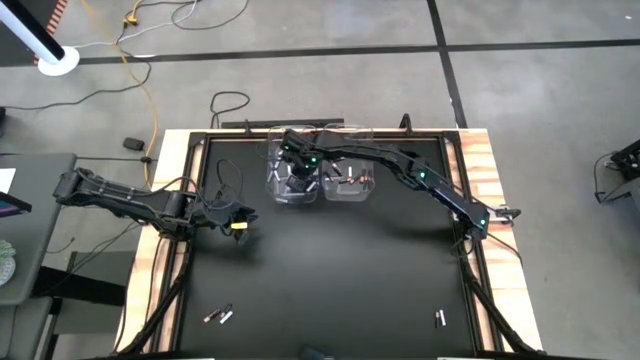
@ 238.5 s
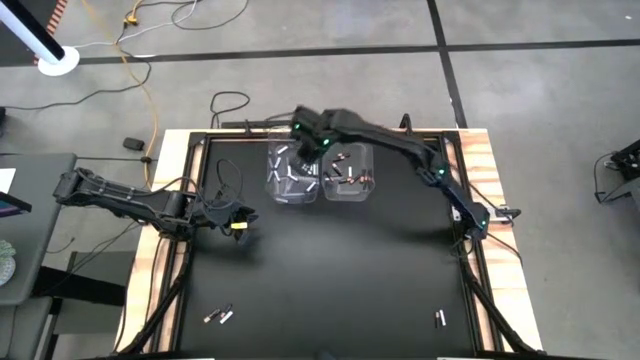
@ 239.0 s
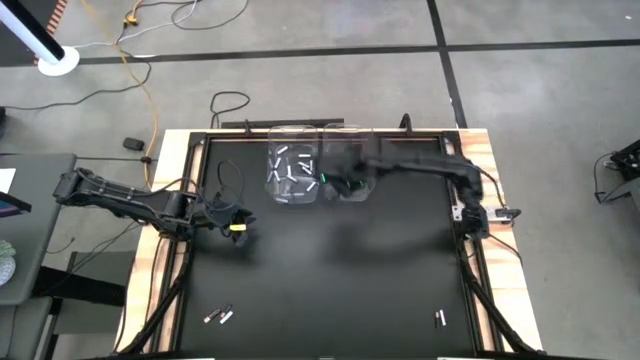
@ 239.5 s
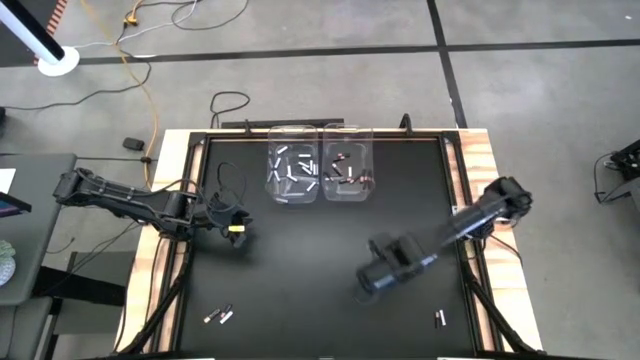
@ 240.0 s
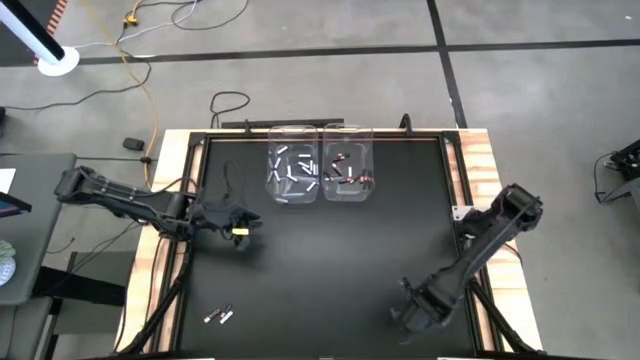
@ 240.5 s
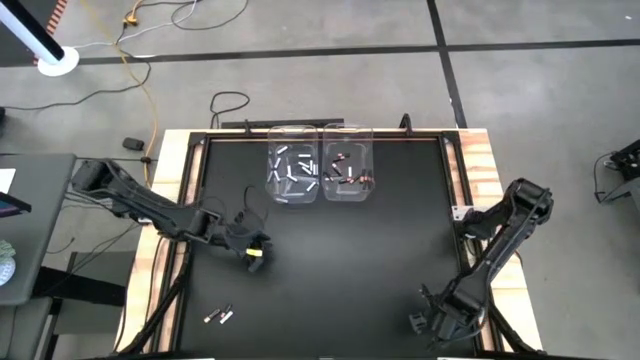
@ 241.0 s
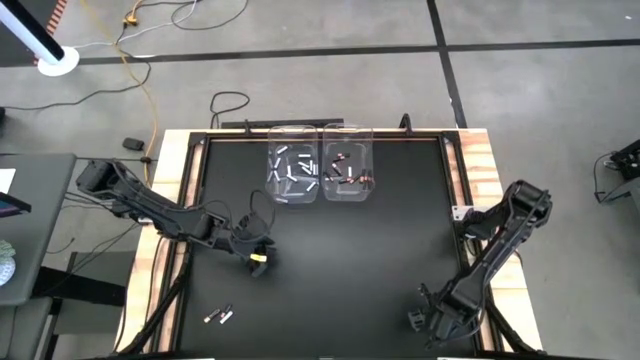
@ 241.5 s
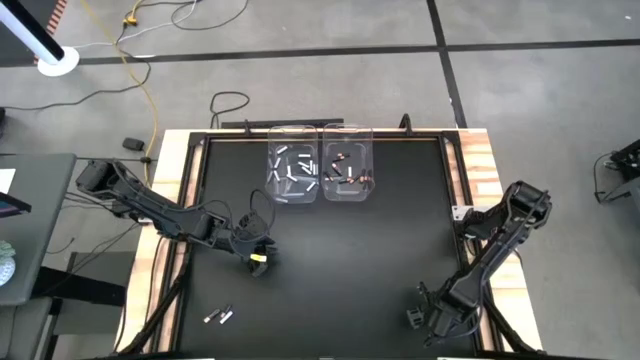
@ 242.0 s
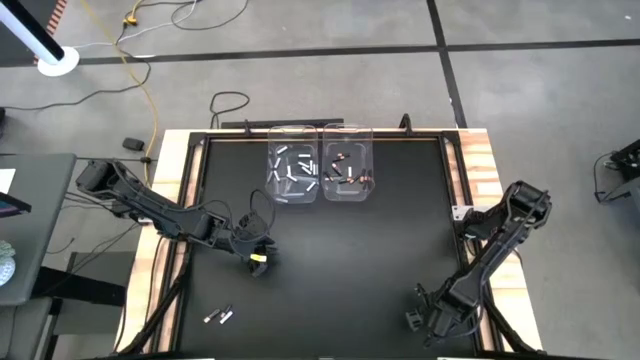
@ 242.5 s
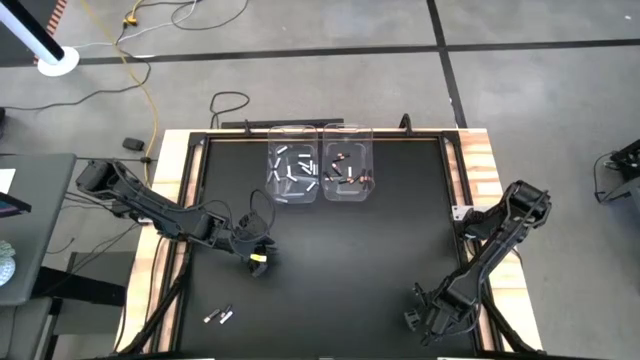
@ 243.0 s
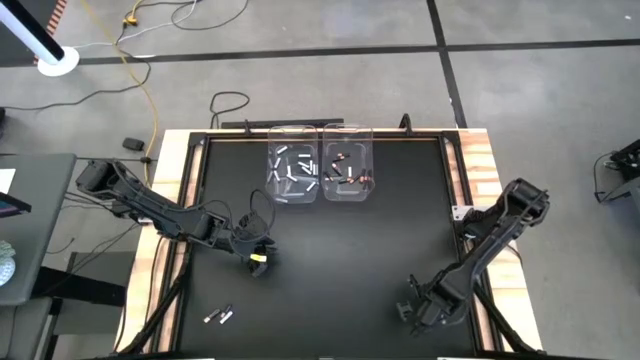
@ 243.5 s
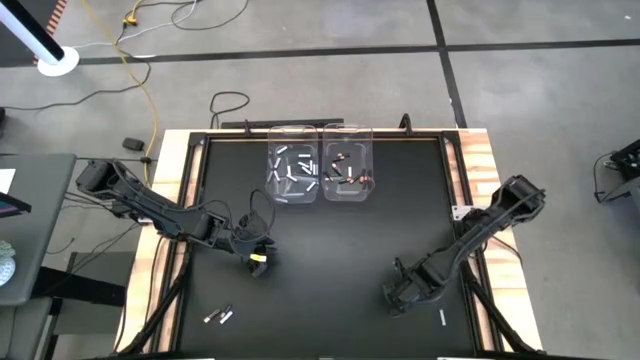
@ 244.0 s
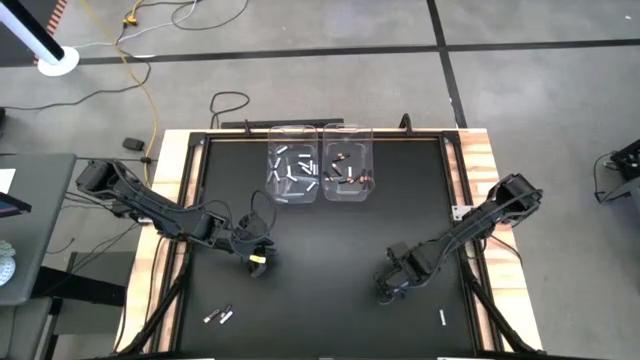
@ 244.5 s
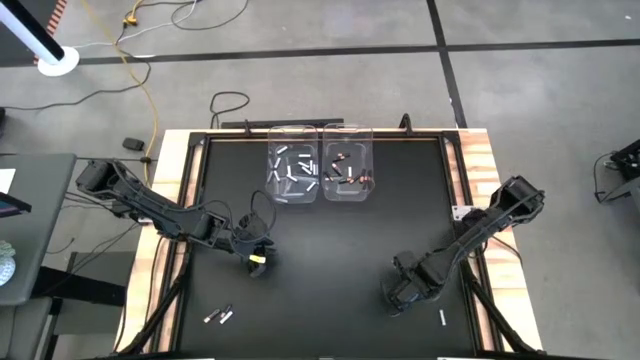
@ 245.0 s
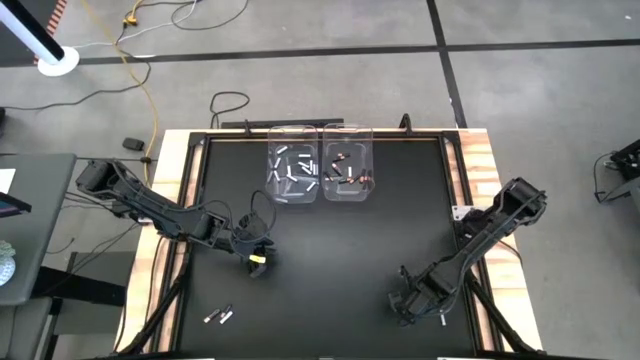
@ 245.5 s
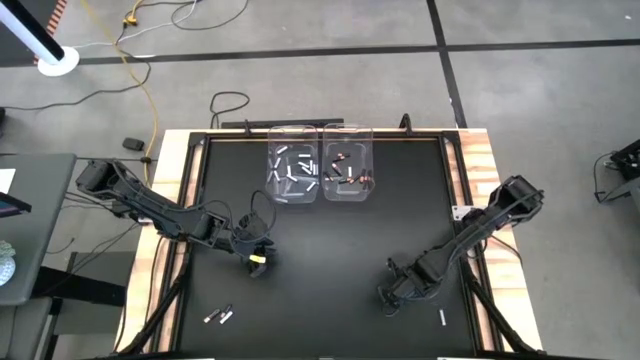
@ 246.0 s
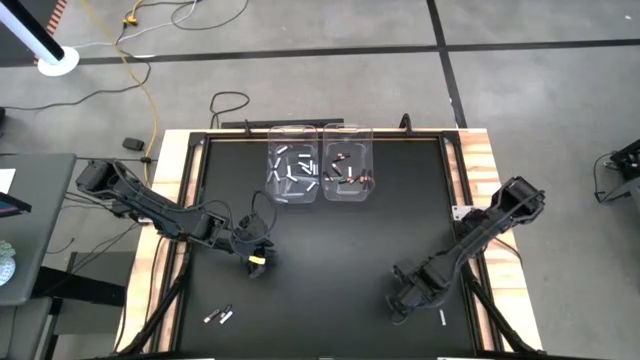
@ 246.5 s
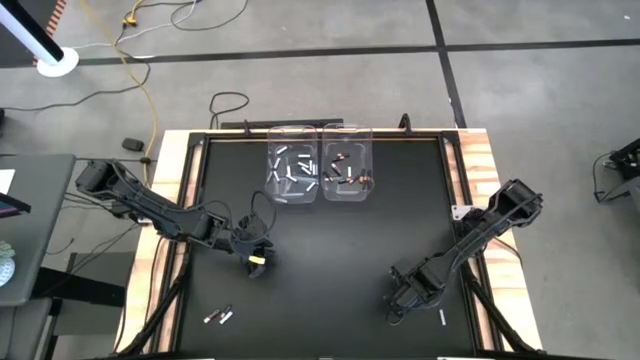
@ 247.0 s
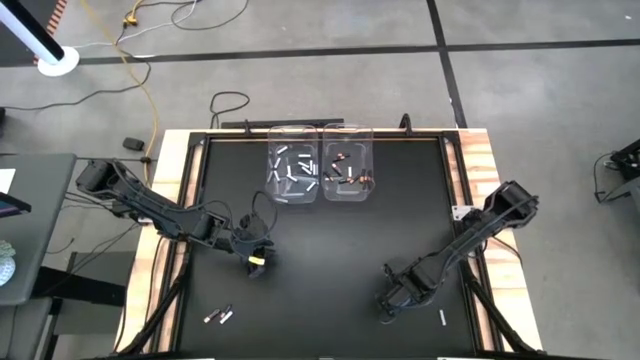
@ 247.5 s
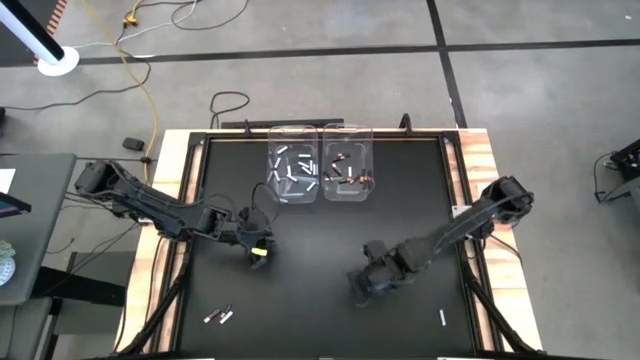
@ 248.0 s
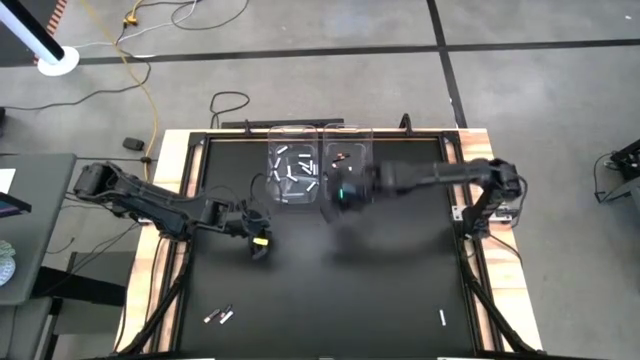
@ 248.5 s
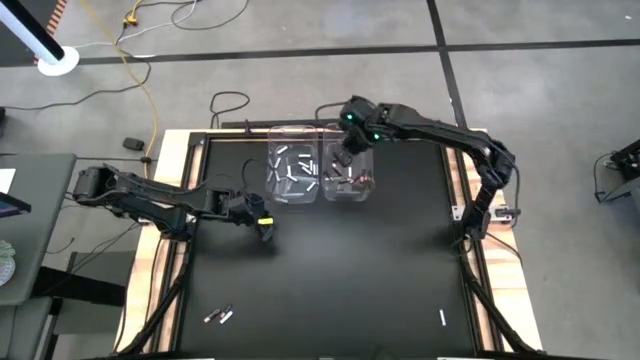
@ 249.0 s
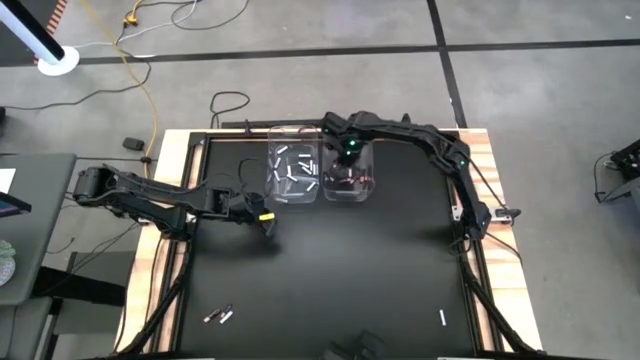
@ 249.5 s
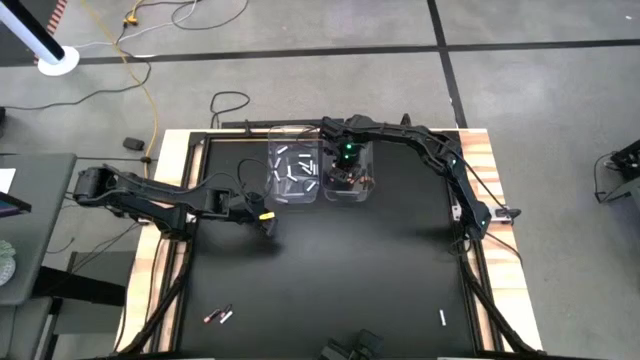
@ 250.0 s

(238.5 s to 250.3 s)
Task: Sort batteries
Put the black battery into the right transparent bin

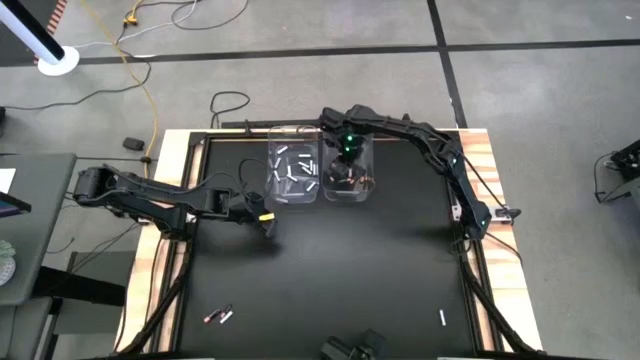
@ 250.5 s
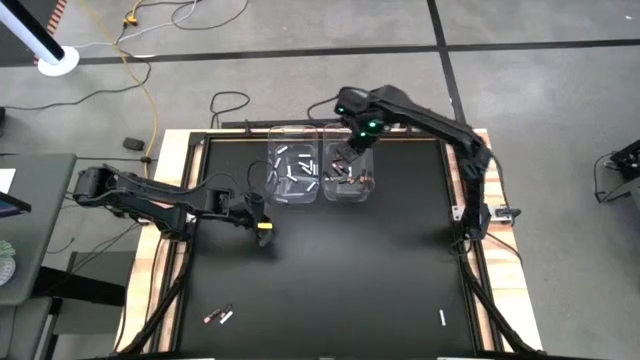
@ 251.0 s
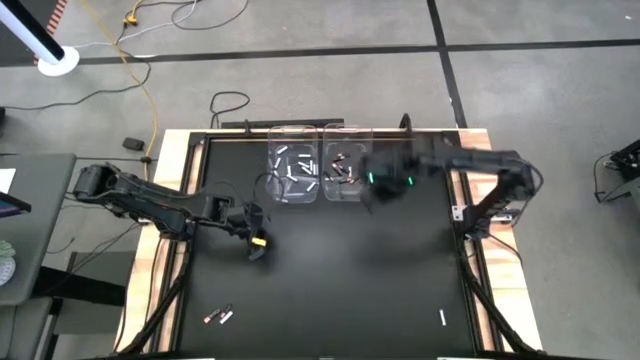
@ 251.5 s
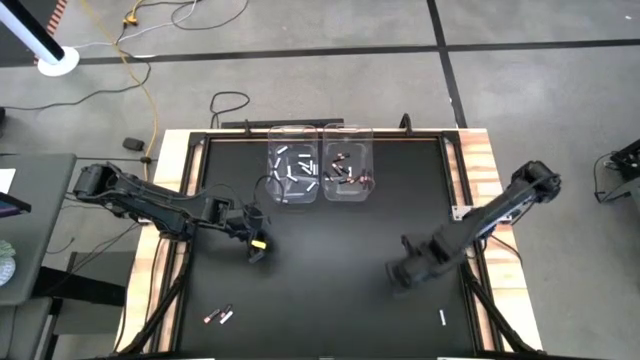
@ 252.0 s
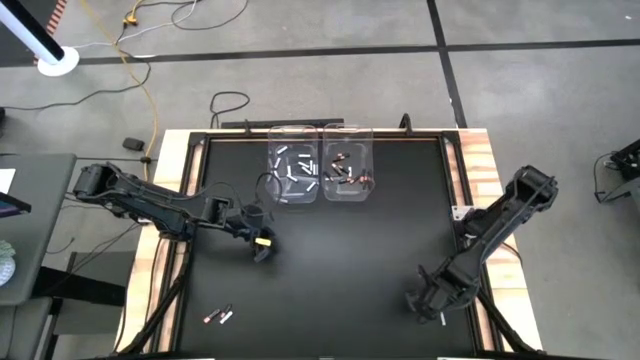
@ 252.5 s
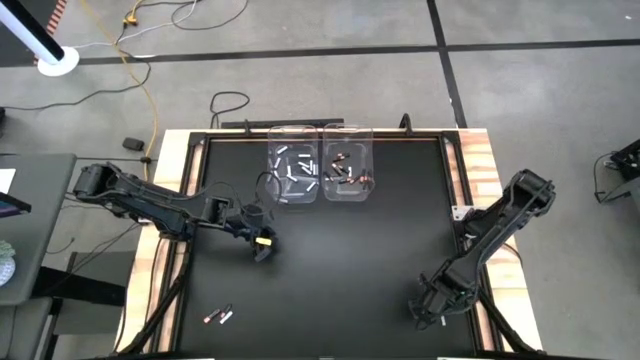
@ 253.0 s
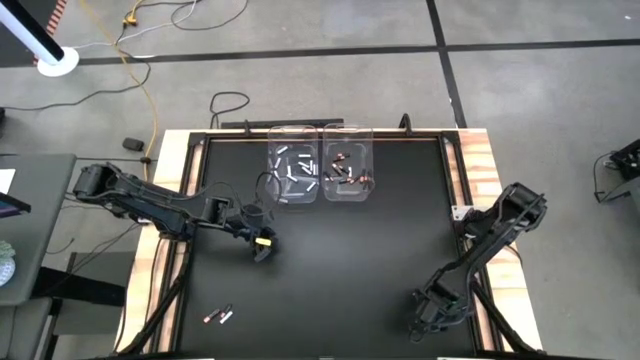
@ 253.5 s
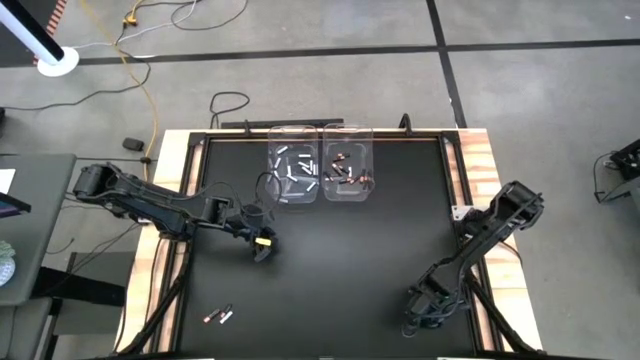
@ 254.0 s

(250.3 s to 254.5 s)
Put the white battery into the left transparent bin

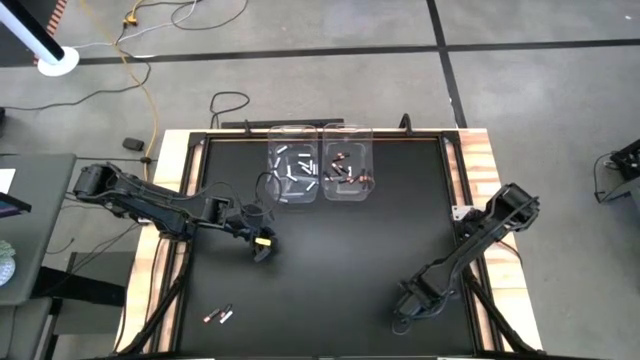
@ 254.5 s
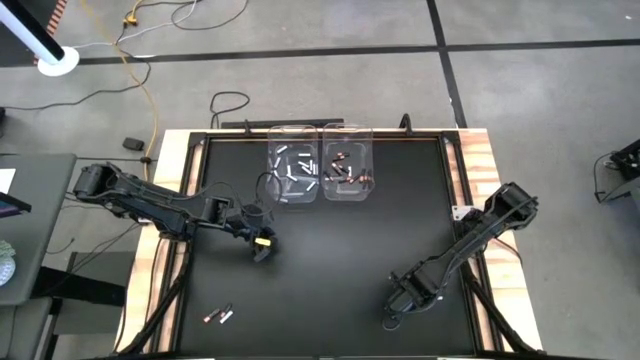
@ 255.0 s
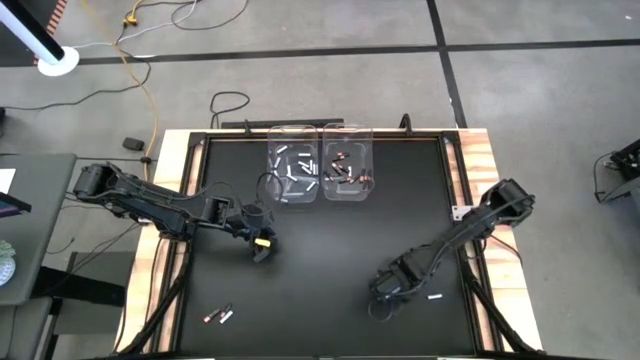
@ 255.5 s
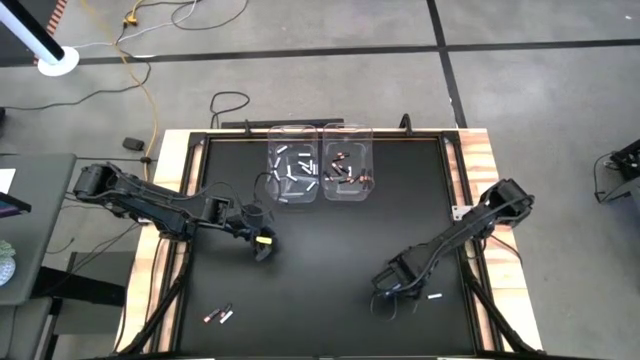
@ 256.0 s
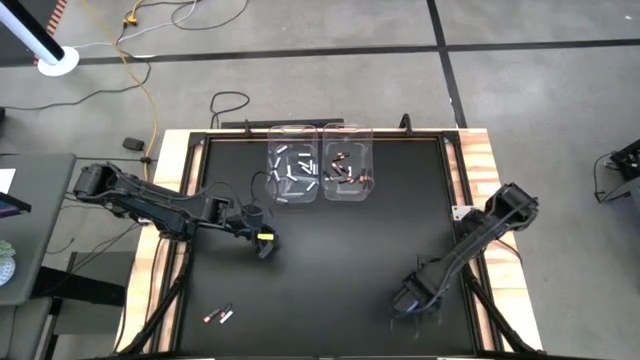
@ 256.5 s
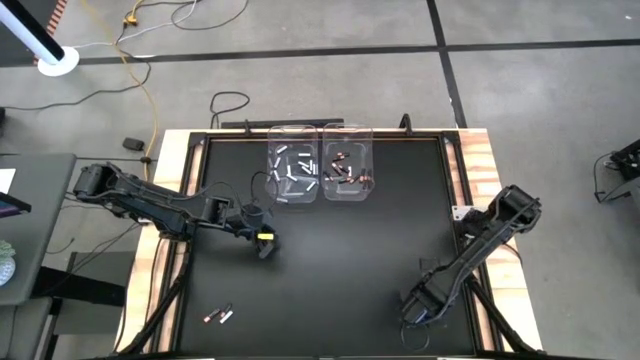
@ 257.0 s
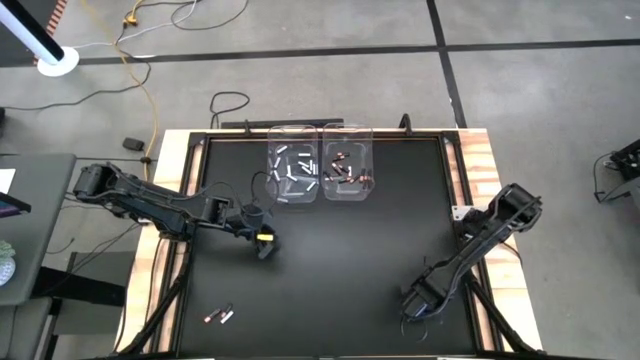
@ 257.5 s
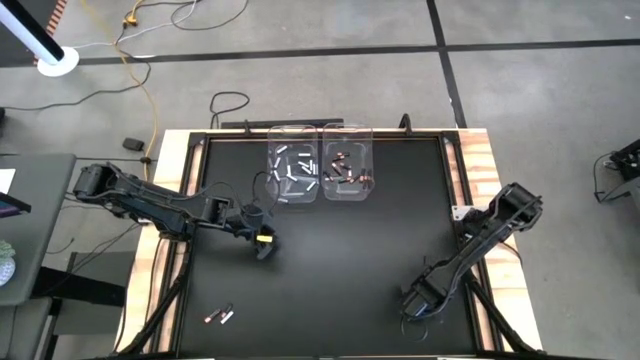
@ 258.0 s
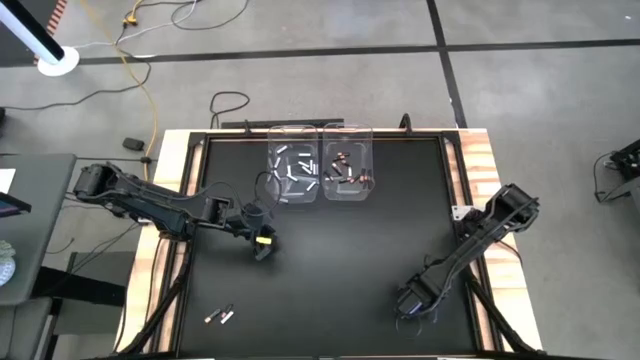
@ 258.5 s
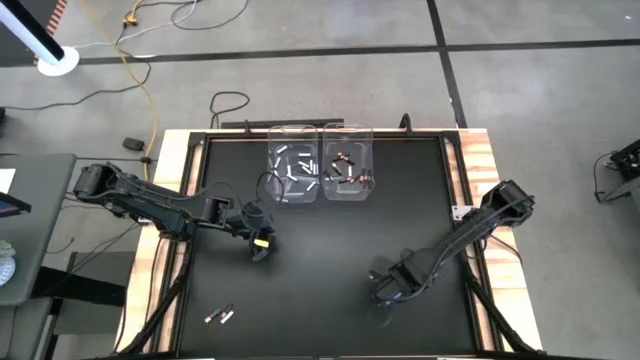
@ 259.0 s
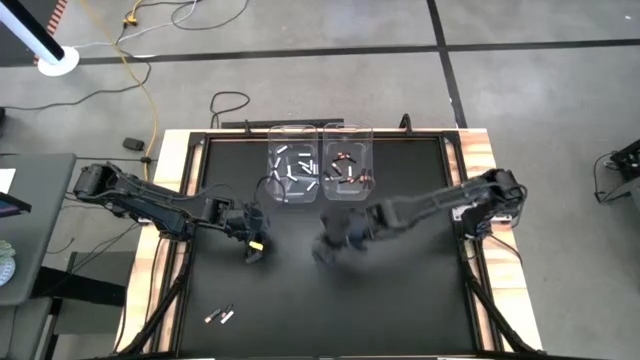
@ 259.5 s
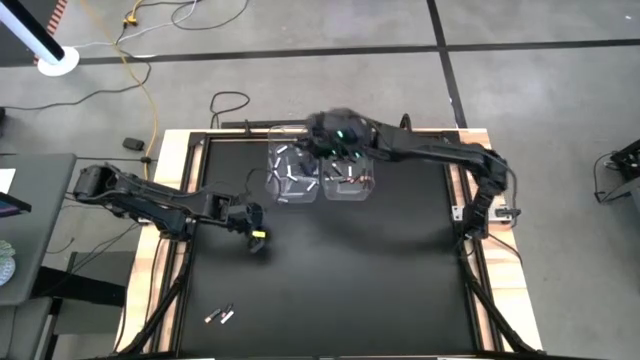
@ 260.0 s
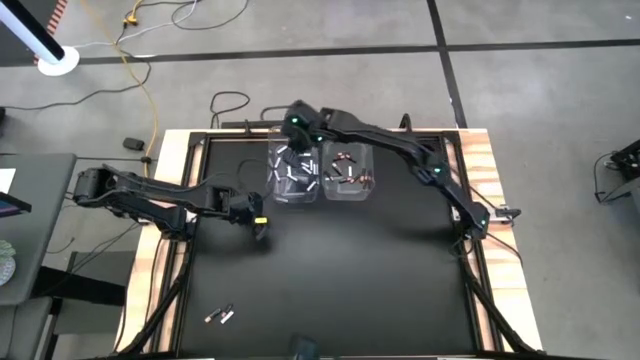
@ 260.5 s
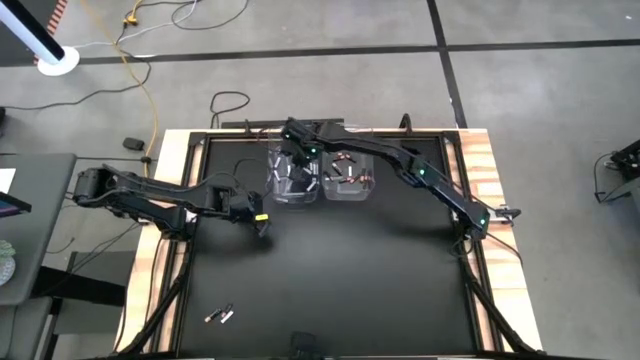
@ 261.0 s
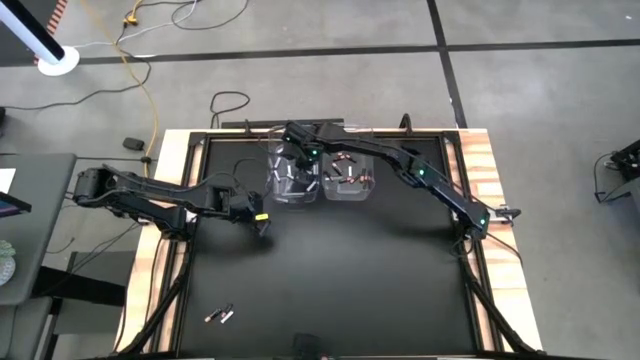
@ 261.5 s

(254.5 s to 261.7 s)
Put the white battery into the left transparent bin
